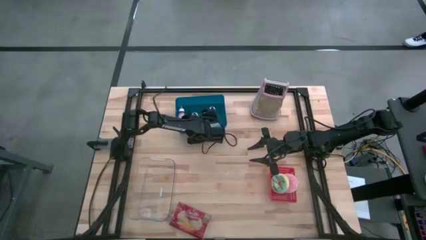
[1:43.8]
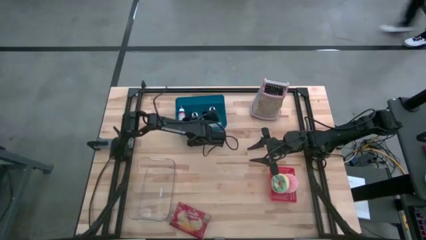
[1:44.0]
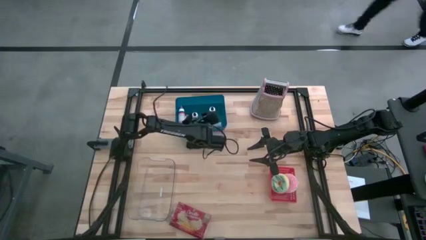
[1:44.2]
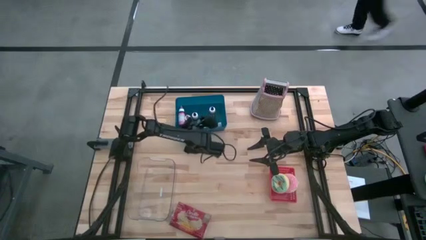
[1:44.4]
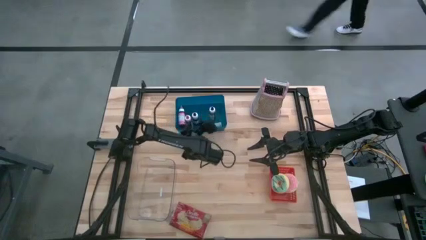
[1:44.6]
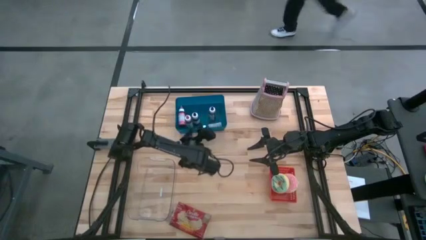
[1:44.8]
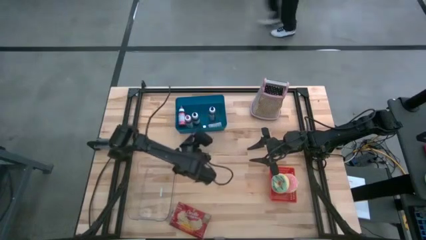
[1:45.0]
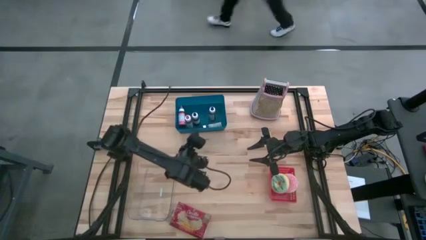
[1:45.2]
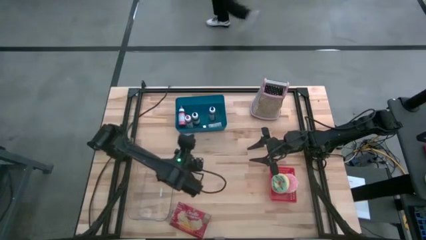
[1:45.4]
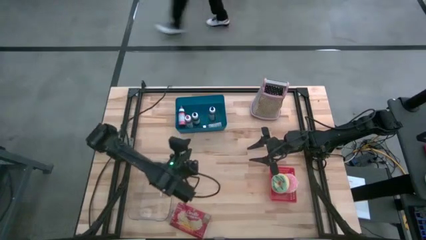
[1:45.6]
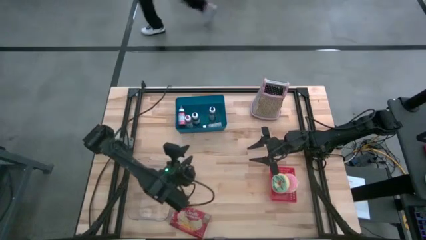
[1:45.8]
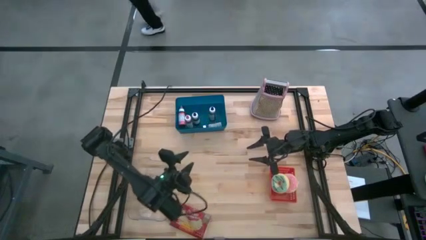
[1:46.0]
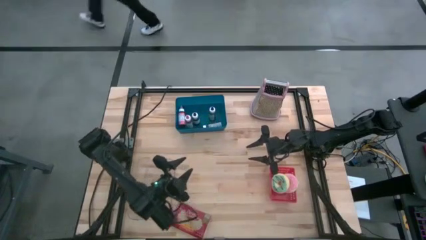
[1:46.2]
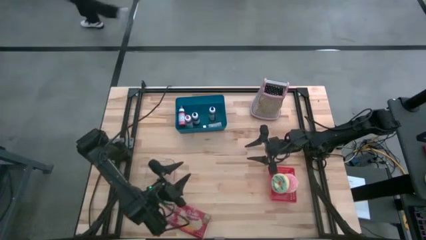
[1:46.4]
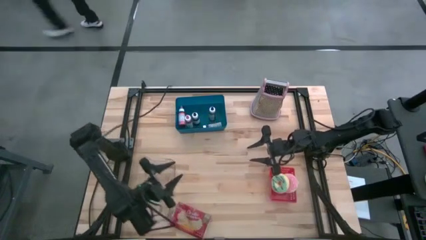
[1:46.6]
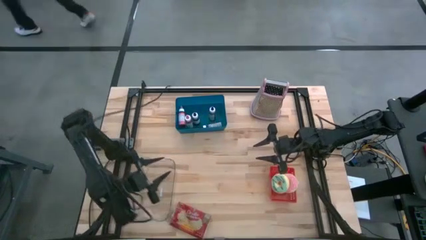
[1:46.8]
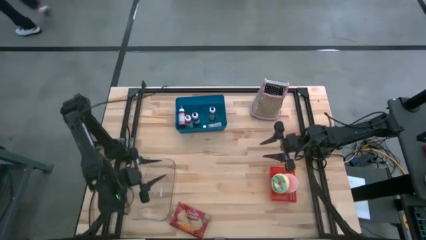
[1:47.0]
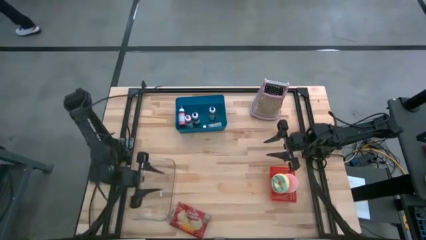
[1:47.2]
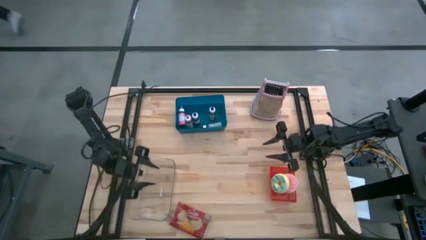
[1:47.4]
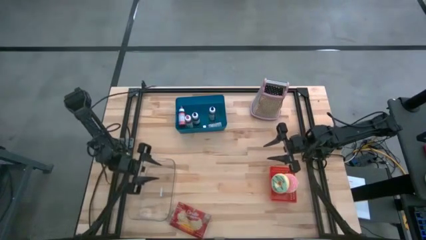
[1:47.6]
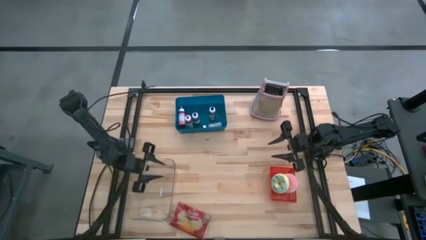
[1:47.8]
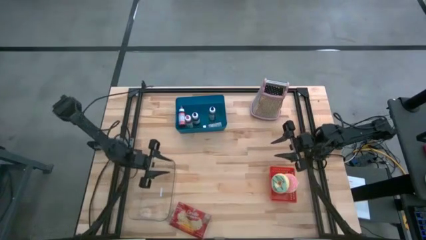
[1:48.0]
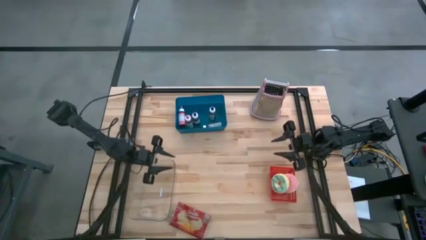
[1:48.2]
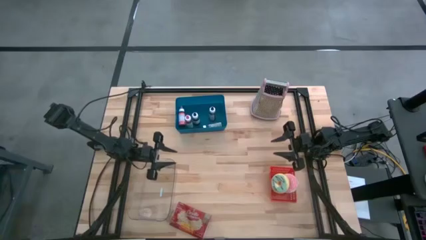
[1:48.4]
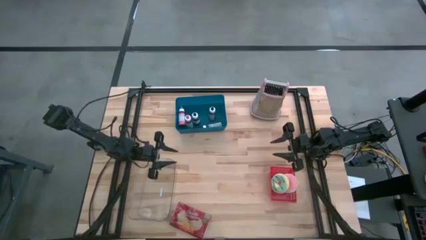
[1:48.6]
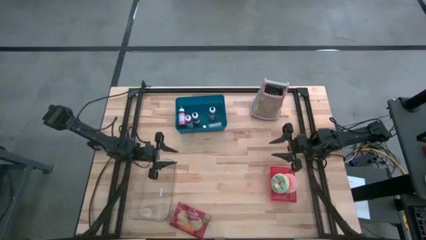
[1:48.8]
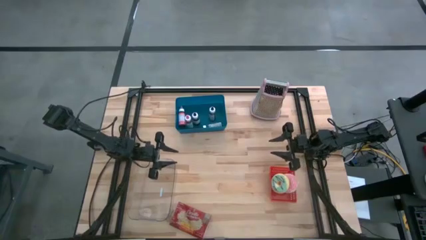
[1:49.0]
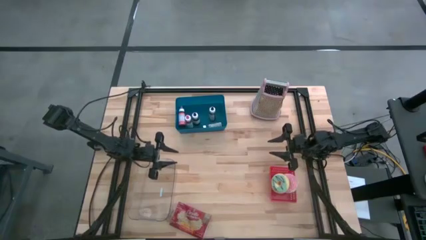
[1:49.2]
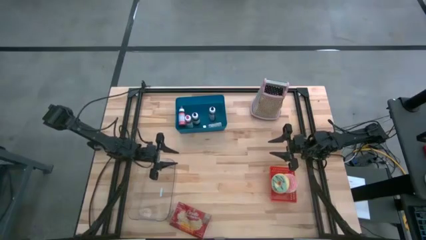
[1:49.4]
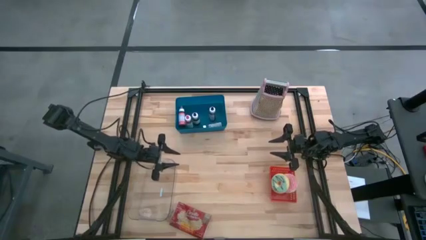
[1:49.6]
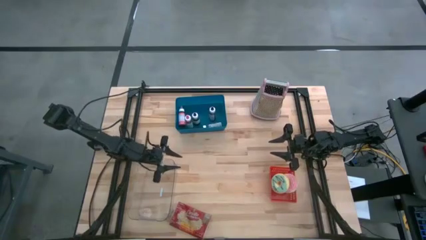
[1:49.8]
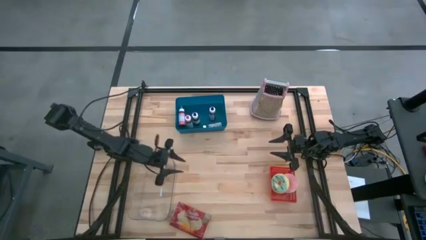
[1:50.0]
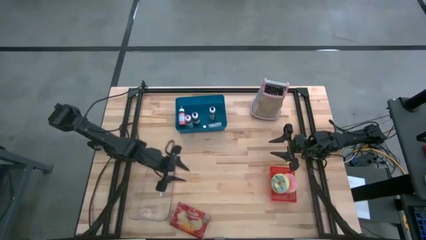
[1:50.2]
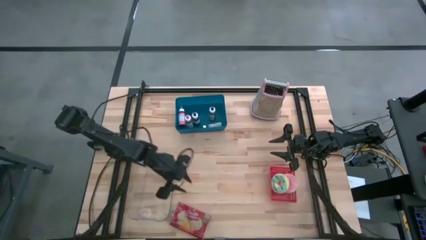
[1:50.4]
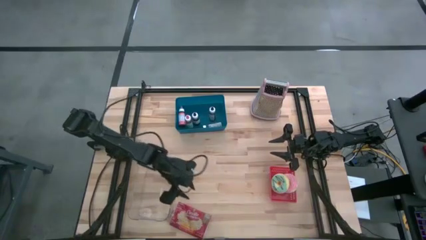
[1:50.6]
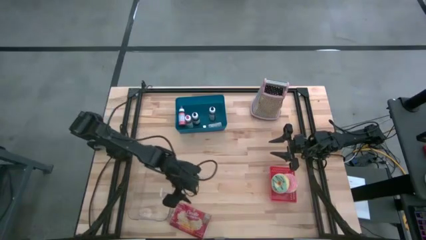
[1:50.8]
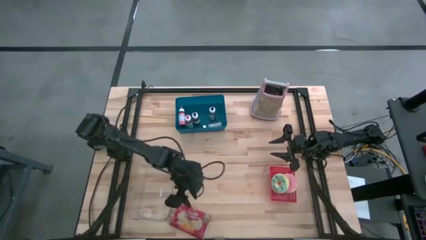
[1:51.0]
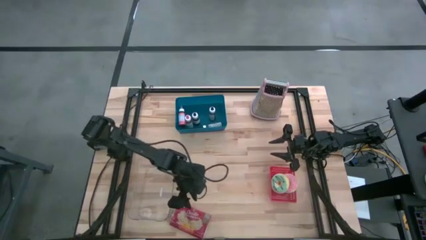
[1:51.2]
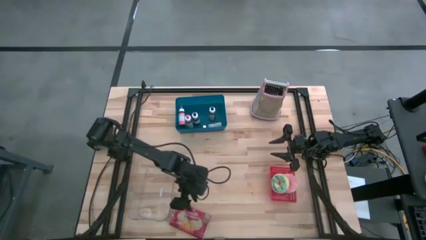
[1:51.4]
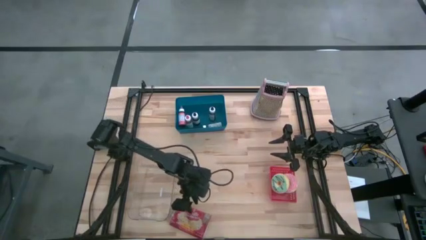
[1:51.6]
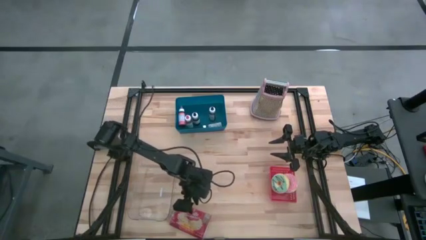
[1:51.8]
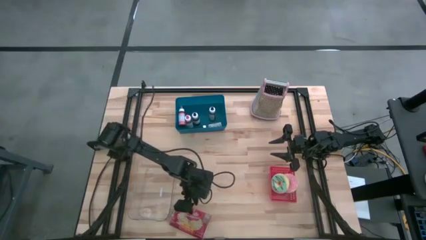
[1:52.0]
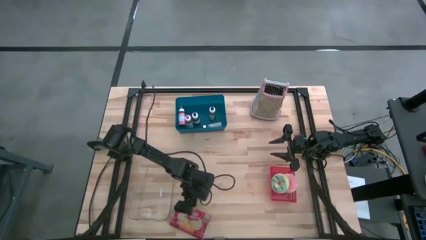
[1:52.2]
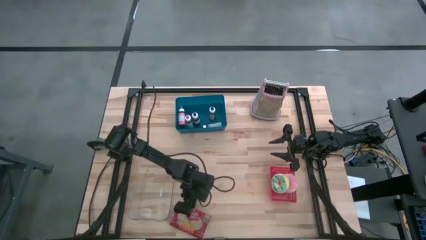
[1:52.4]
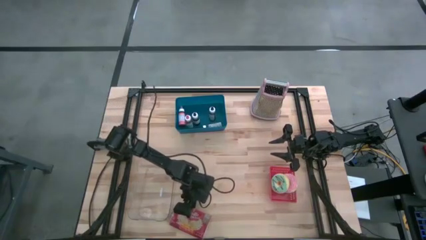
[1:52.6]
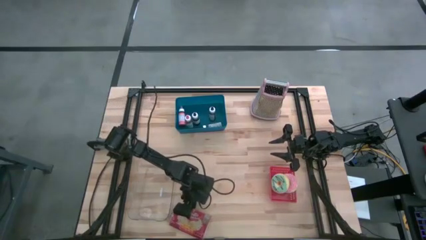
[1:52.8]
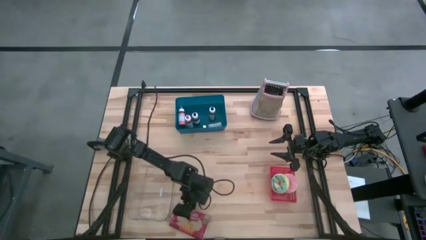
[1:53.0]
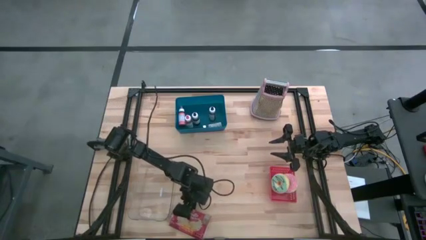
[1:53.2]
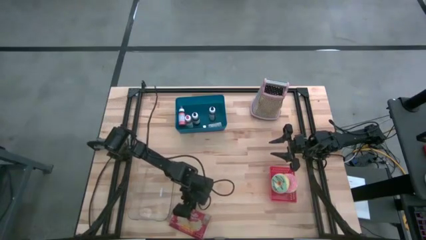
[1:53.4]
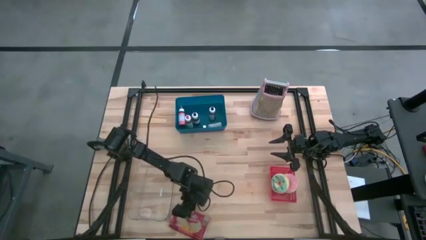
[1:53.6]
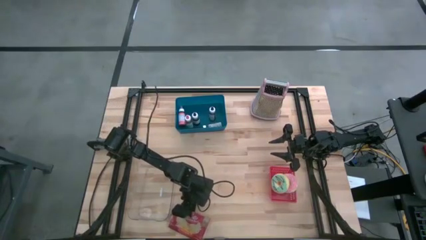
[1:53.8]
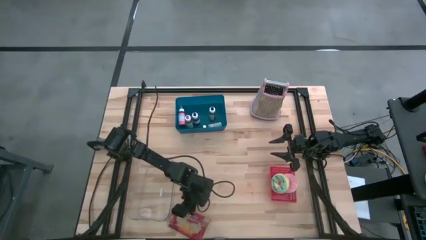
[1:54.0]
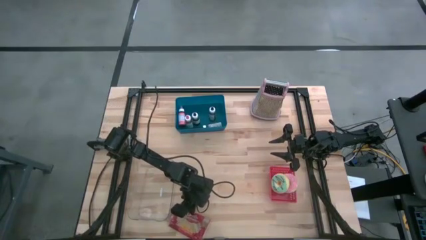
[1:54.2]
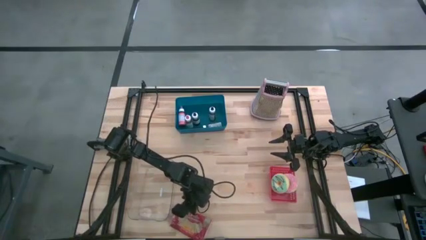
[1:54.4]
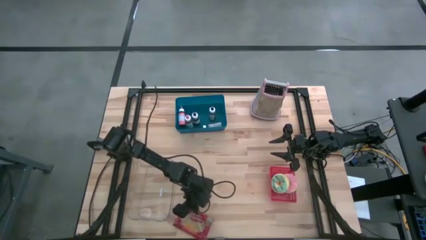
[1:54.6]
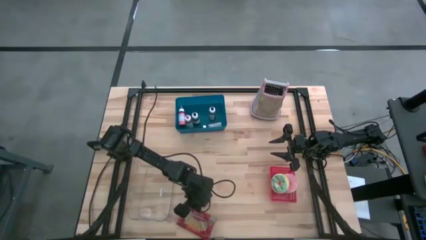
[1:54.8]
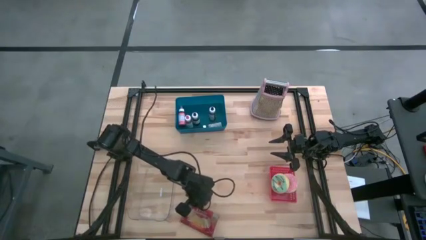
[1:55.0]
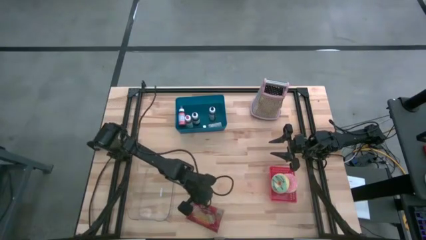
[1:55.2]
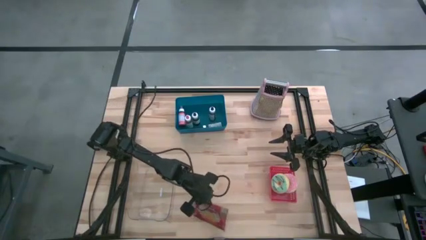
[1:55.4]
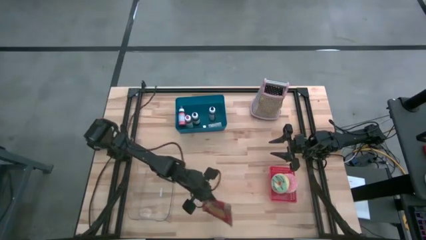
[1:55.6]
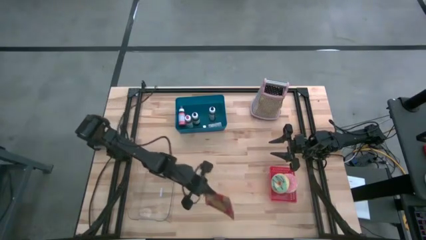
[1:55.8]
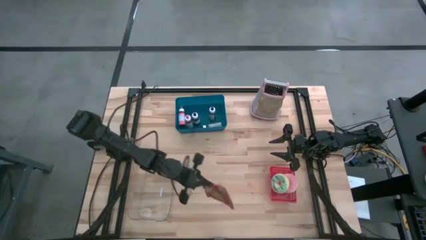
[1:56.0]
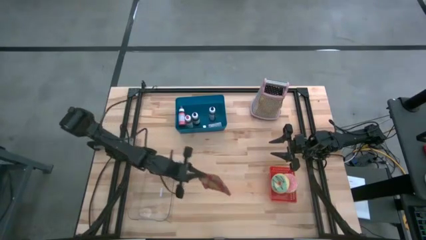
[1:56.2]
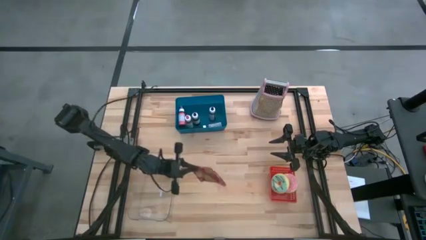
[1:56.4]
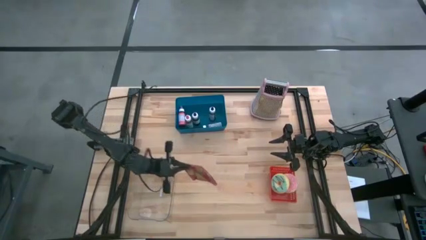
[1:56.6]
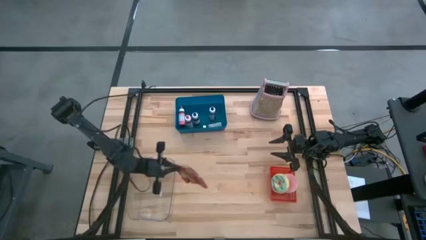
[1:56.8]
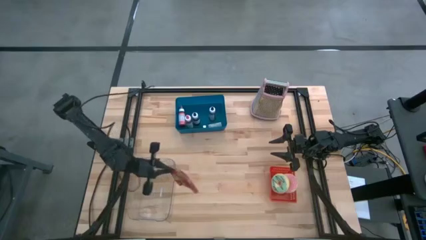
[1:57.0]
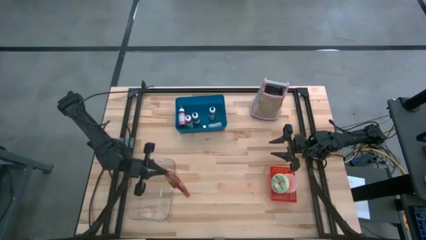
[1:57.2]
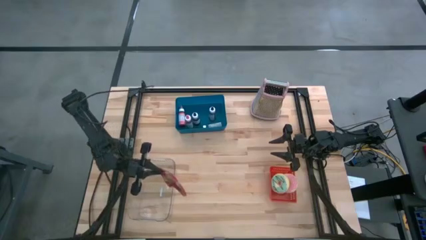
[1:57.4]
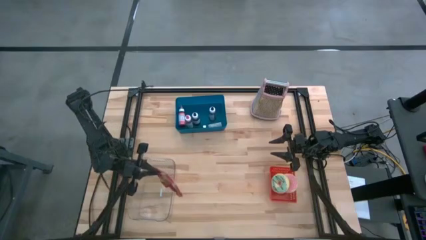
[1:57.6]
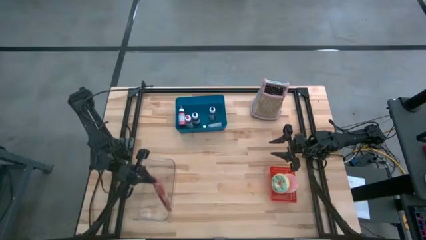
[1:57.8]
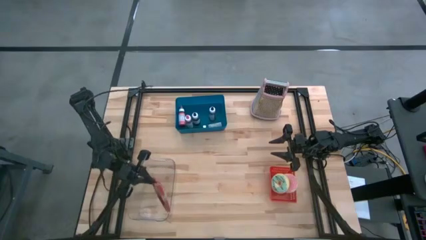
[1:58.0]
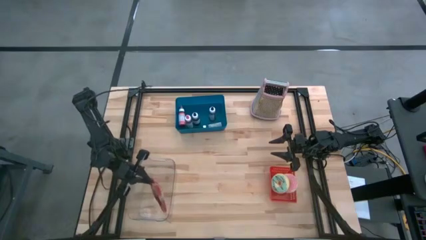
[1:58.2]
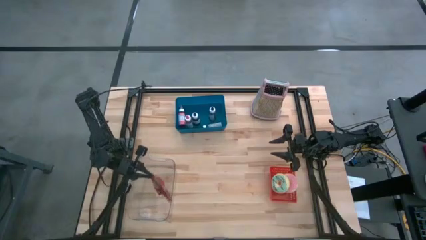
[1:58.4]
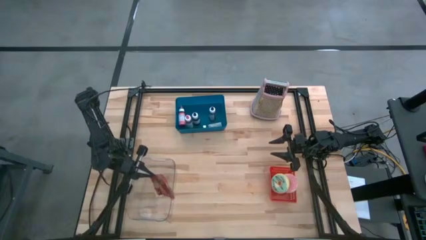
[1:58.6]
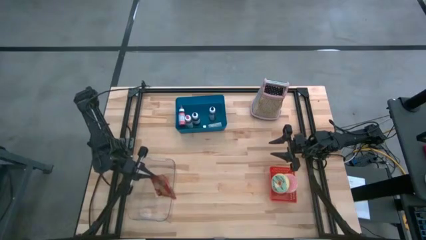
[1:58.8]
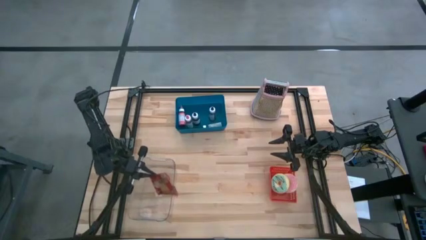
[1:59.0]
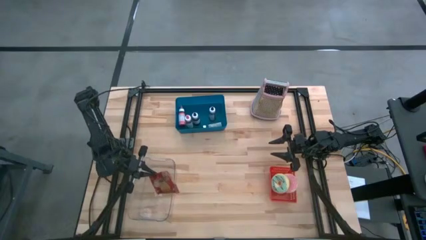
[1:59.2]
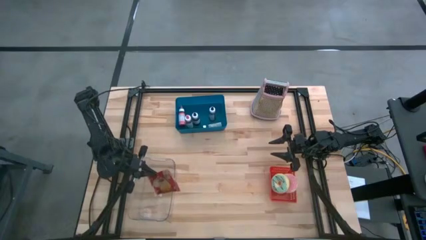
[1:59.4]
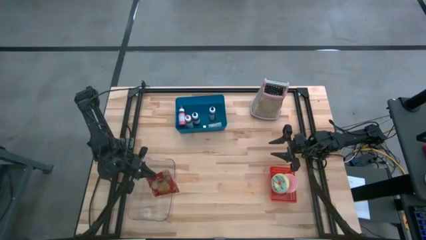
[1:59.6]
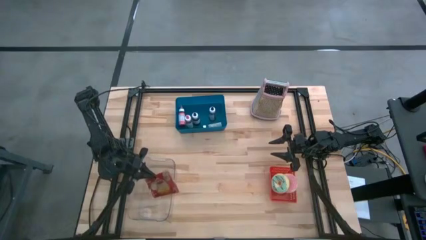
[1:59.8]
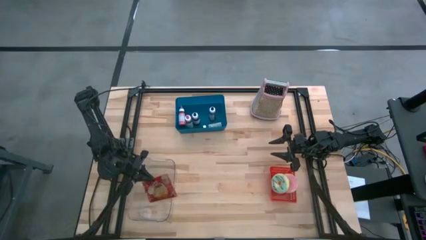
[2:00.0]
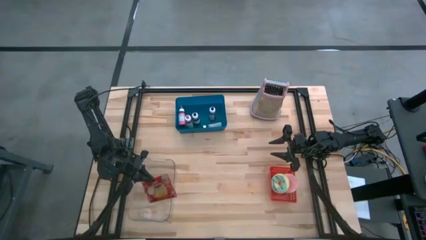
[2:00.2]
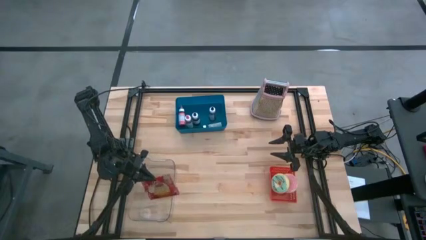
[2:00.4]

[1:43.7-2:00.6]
Task: Pick & Place Food Item
Put the orange popcorn bag into the transparent bin

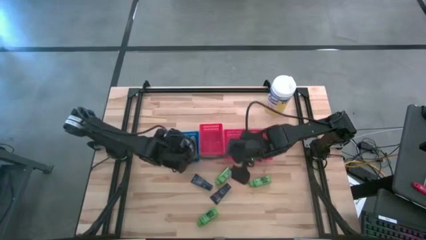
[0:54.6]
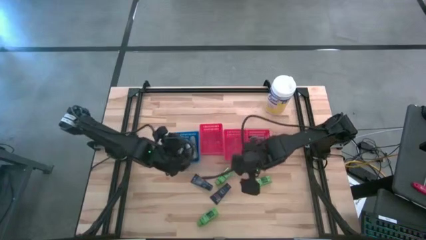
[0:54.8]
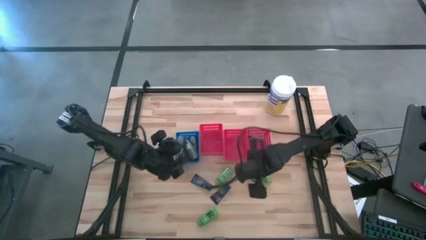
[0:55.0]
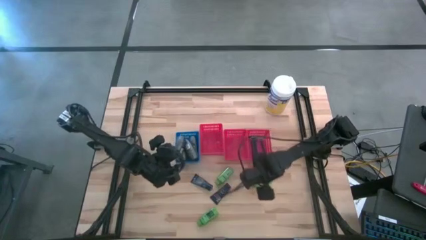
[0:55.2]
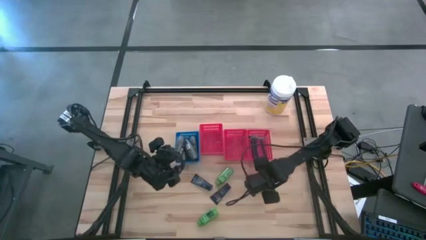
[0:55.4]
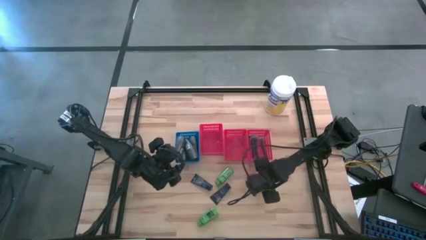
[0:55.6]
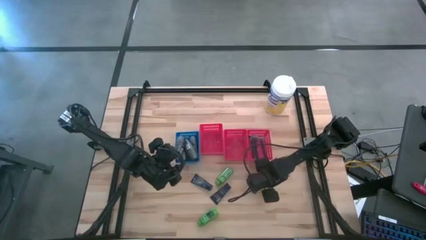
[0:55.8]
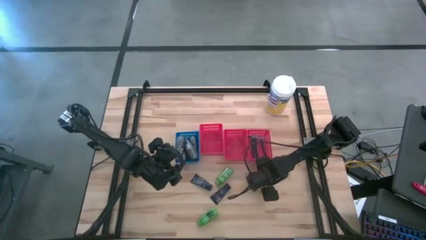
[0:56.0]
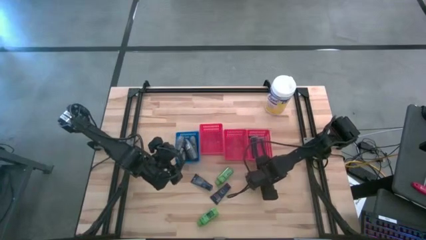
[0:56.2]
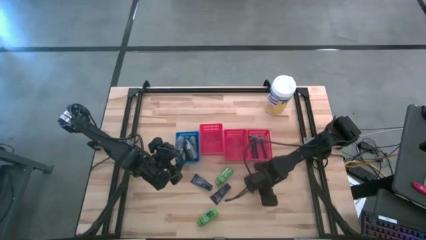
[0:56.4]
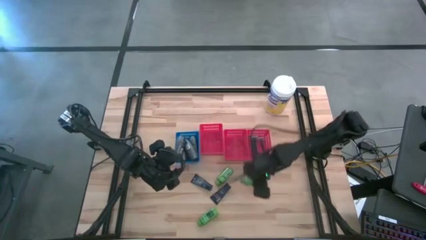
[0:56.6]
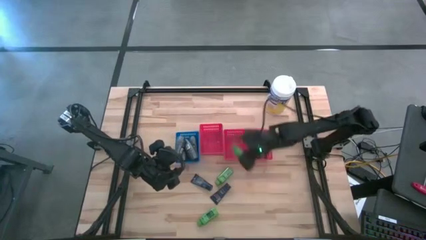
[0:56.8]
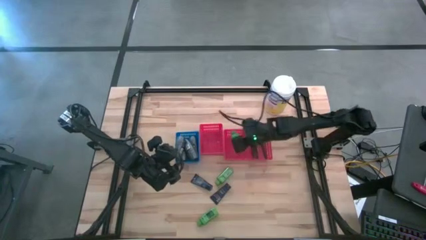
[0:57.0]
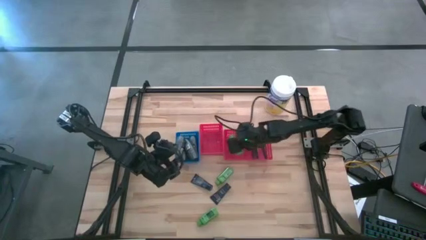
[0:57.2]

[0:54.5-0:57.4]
Task: Pick & Place Travel size toiletries
Put the green shampoo into the middle red bin
